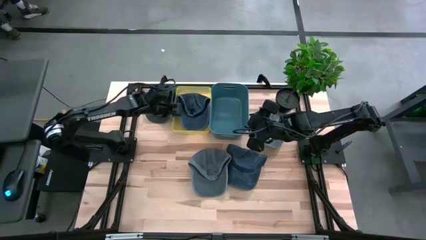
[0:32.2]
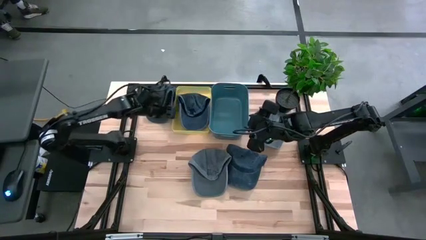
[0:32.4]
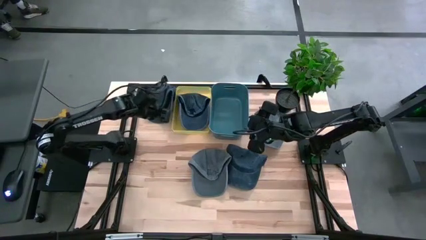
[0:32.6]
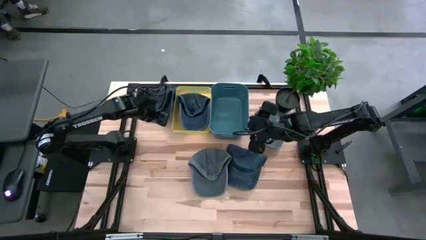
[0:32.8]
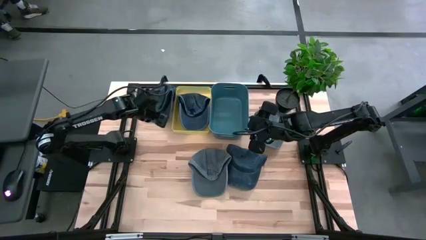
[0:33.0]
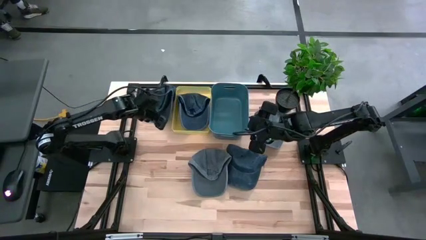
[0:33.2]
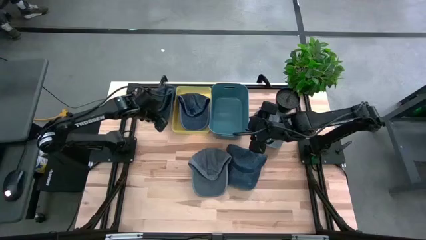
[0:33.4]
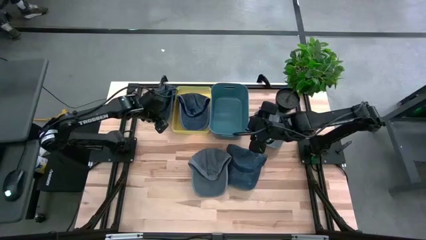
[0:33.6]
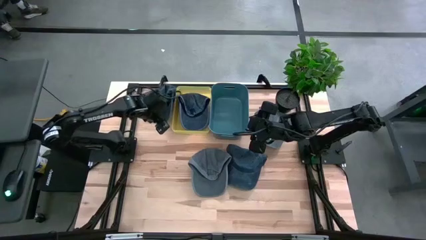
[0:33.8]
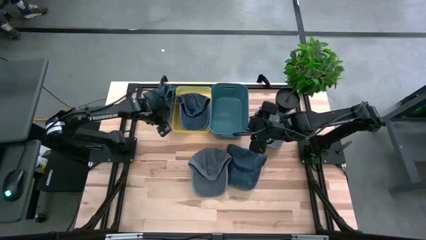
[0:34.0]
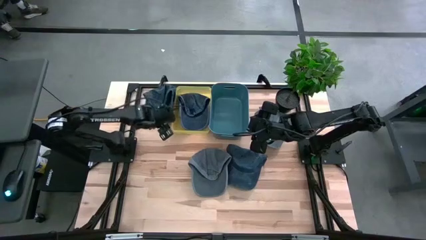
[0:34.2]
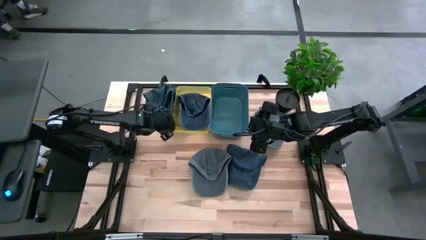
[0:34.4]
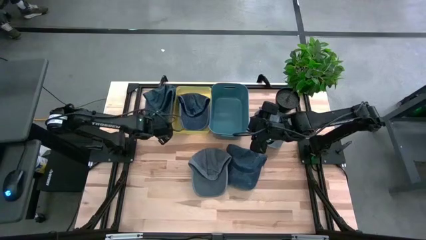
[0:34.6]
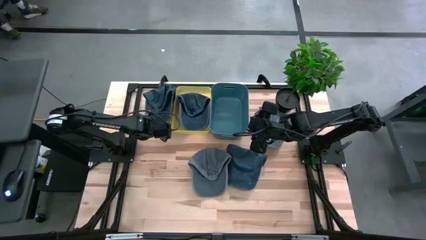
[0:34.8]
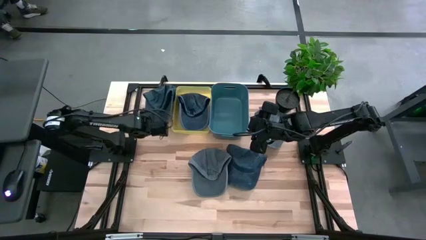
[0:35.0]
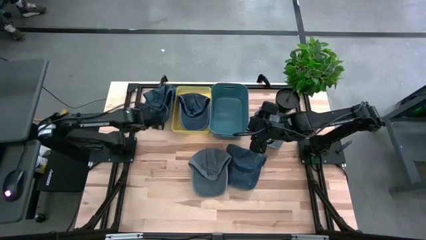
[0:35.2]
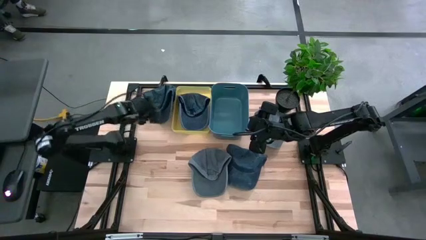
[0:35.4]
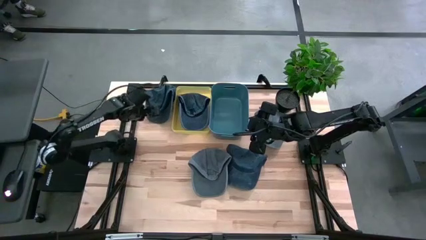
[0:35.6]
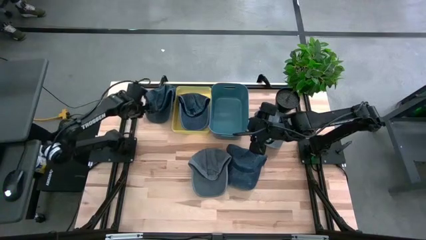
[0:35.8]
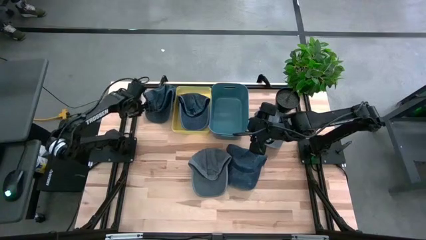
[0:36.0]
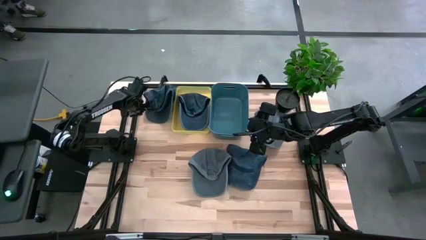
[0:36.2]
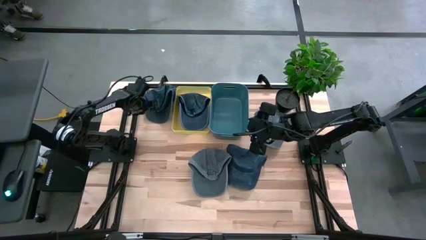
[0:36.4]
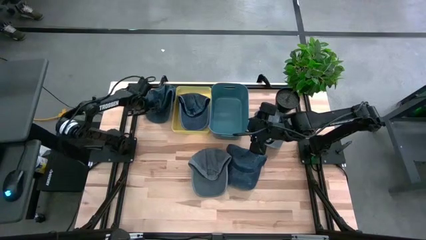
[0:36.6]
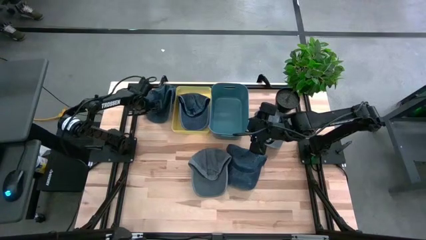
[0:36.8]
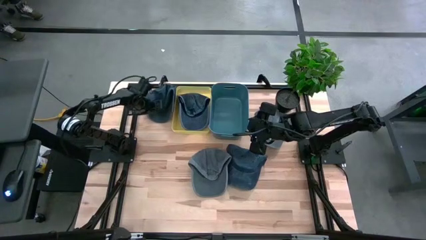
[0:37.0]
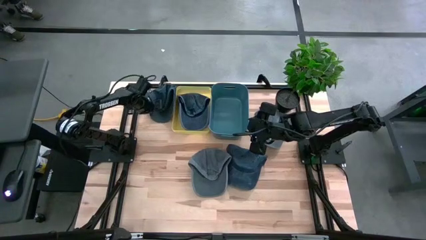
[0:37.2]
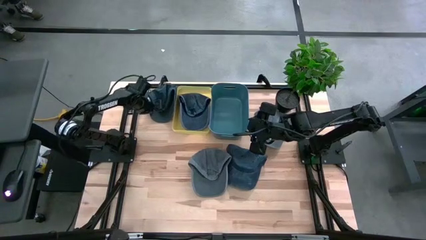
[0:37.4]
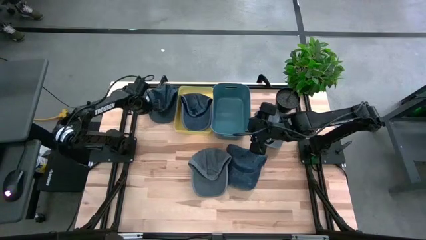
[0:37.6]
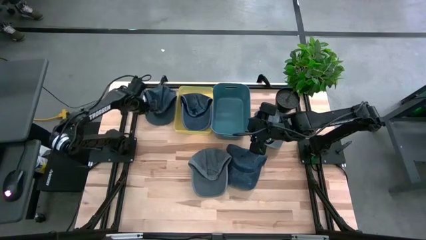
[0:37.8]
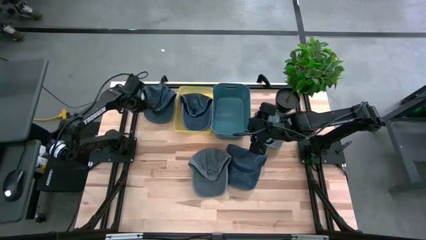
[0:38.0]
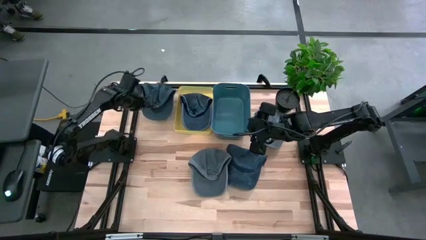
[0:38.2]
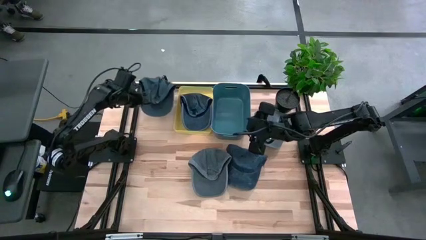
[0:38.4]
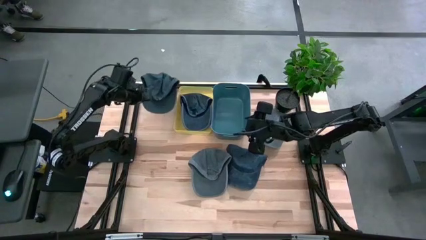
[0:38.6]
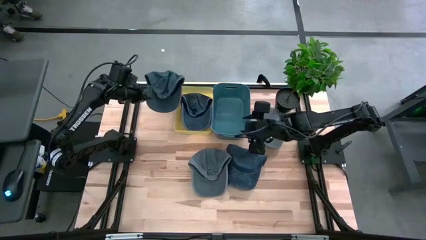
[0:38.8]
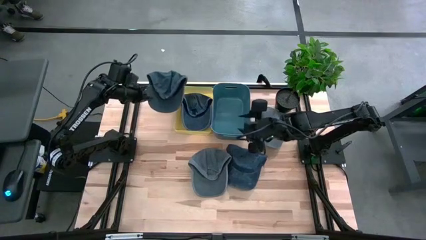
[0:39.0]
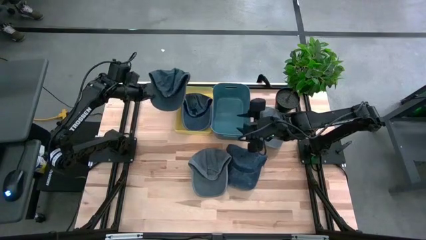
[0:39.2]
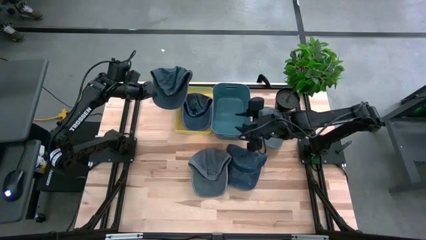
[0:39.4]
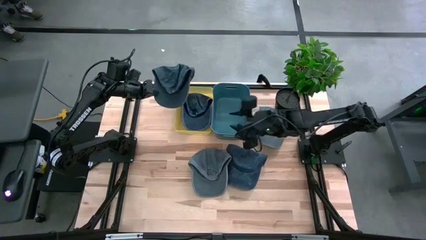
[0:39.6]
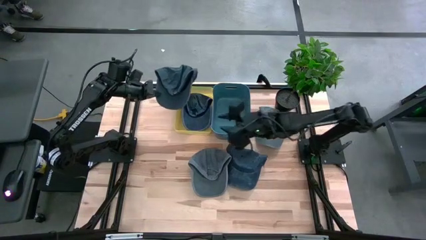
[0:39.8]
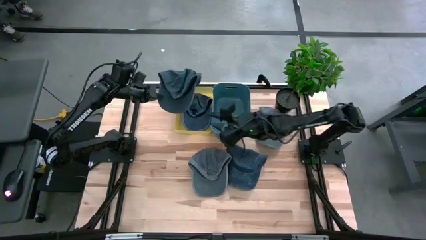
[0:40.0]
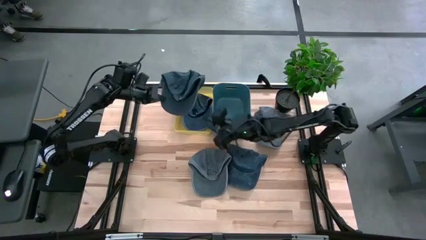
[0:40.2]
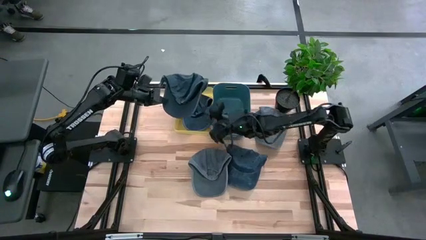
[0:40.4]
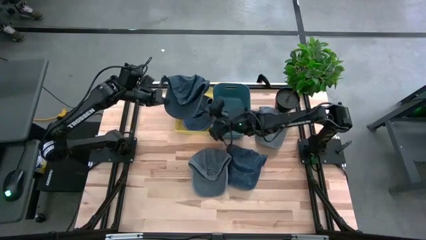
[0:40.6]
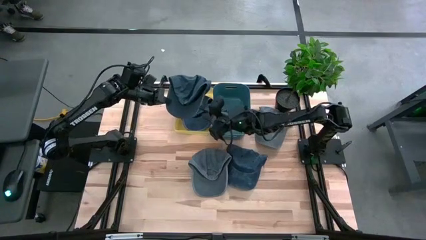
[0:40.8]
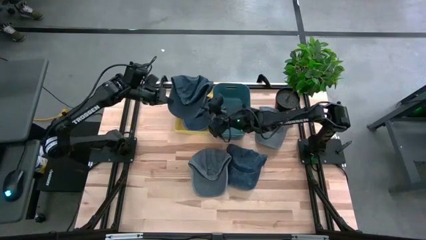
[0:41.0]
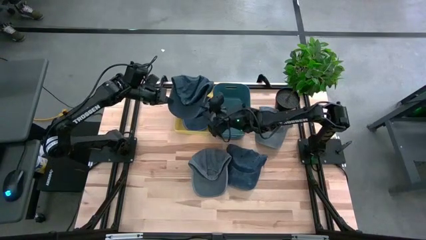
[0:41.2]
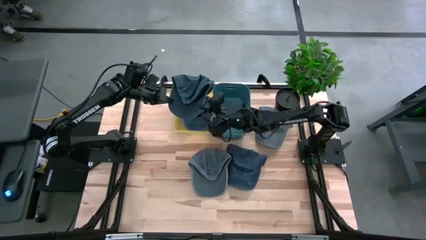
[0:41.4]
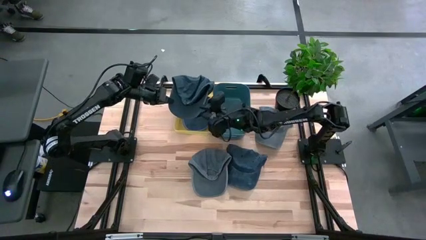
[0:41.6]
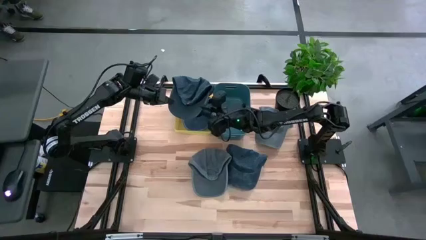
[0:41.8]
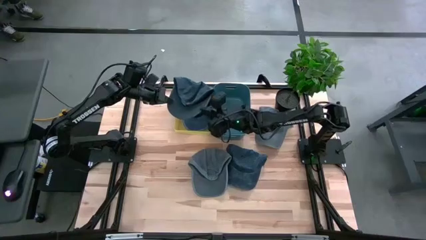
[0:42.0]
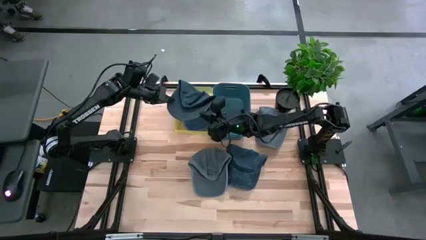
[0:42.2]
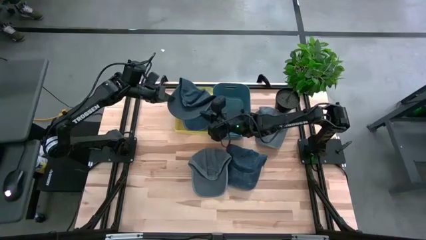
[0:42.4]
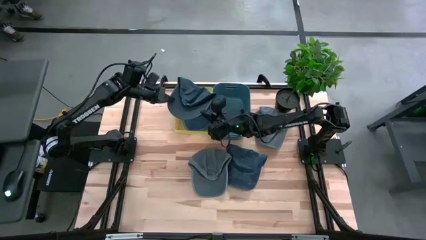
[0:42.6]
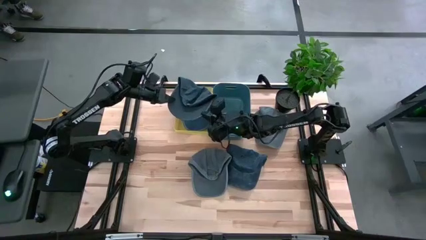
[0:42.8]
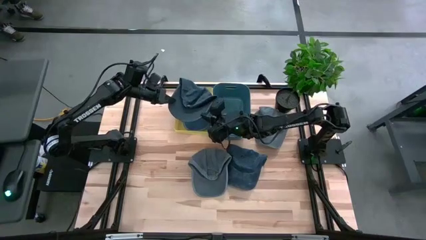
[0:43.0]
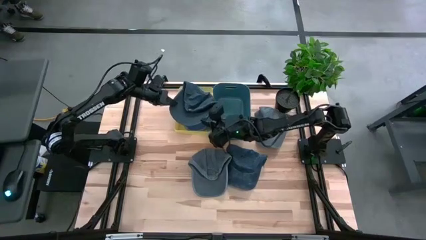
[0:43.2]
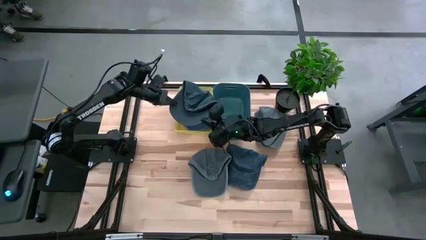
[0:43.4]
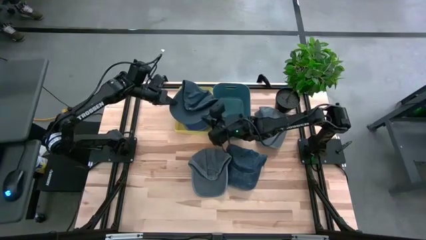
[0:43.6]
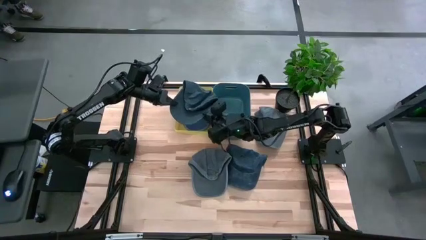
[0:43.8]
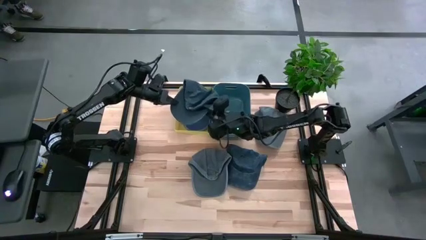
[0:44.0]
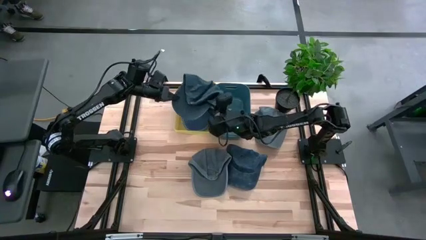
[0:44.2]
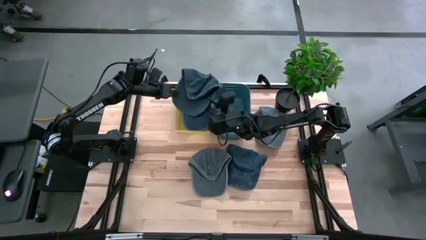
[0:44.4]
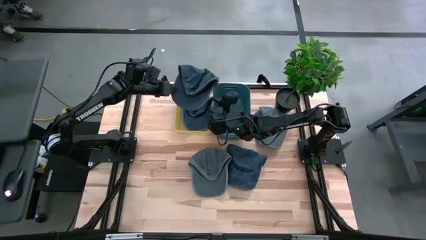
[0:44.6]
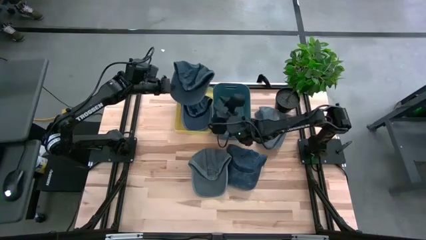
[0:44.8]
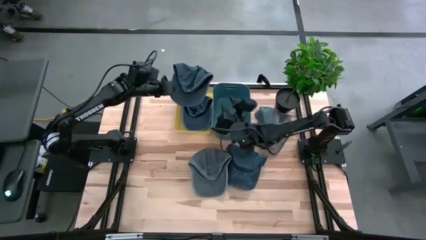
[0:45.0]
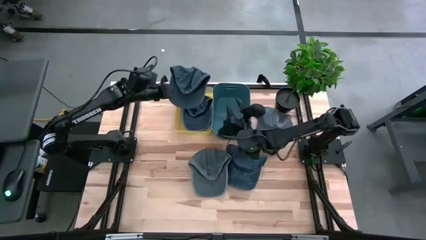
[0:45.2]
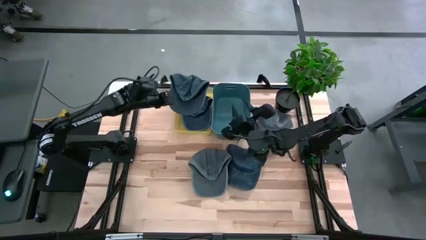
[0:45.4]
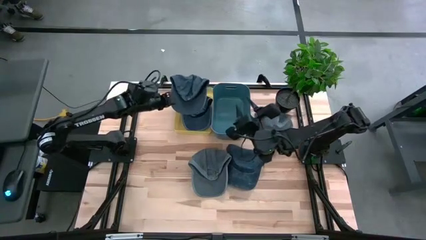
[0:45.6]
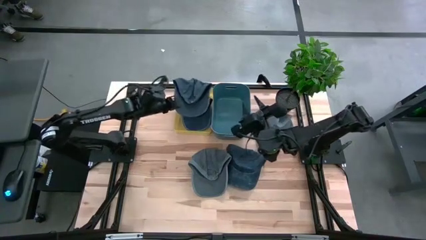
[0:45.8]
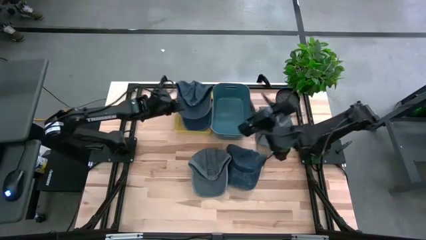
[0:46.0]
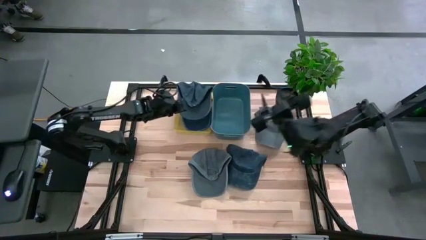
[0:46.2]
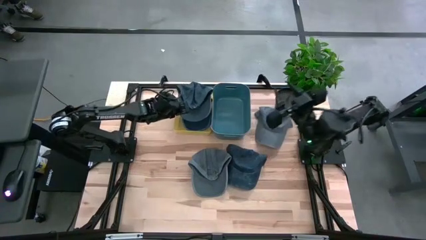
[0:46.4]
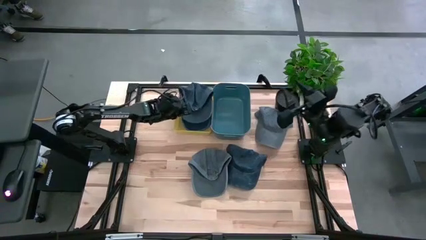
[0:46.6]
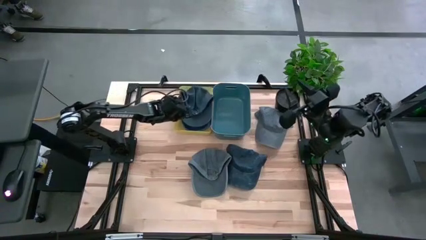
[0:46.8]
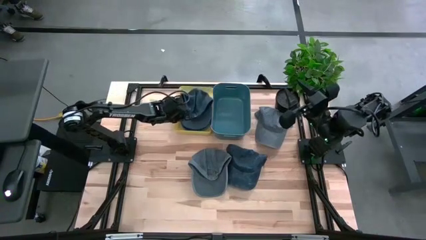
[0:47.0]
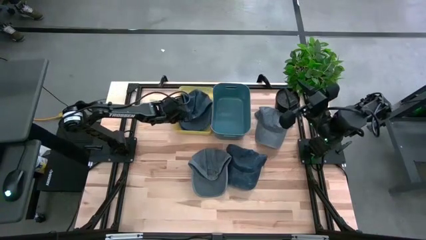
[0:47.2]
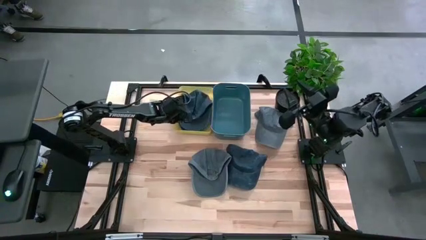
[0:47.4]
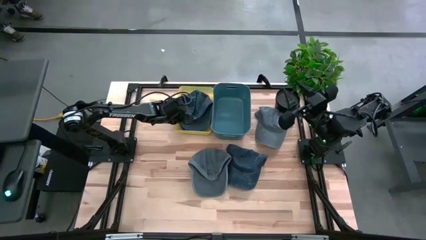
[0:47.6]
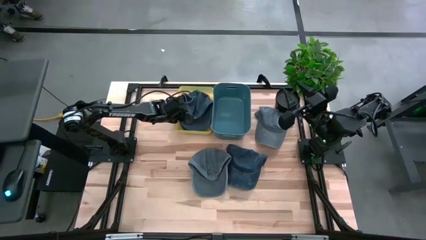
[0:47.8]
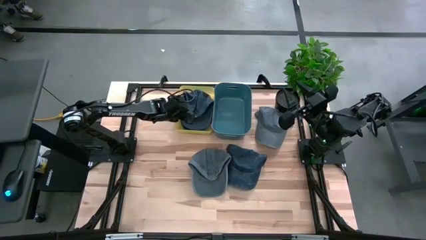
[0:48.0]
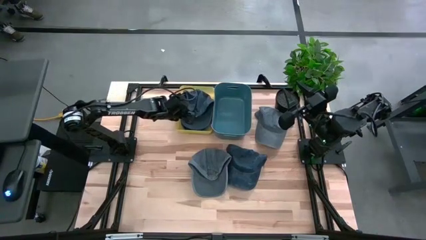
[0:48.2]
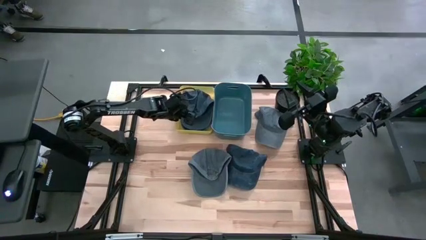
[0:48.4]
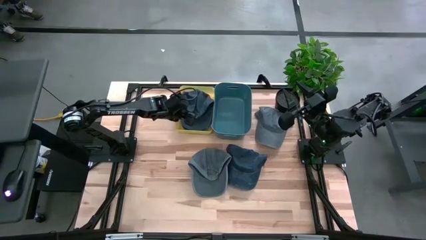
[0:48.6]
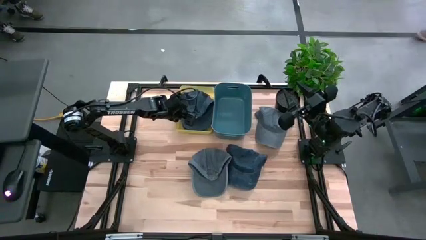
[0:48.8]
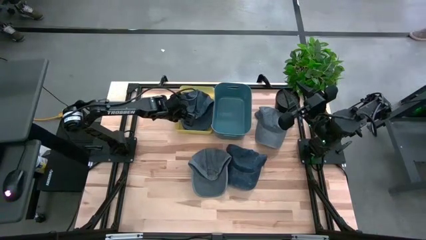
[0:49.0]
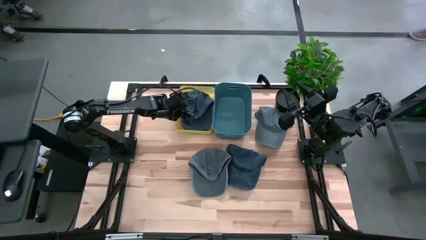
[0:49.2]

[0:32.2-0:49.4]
Task: Pick & Place hat
Put the left blue cap into the yellow bin
